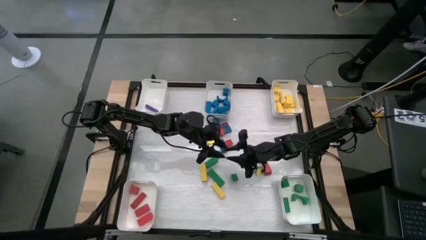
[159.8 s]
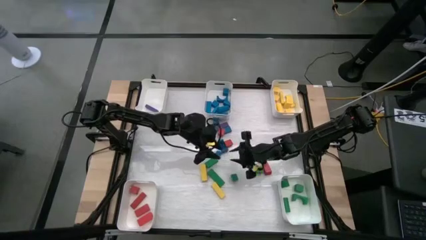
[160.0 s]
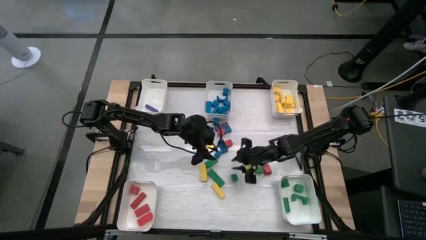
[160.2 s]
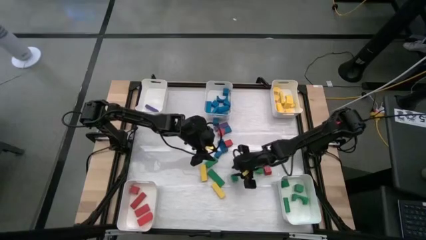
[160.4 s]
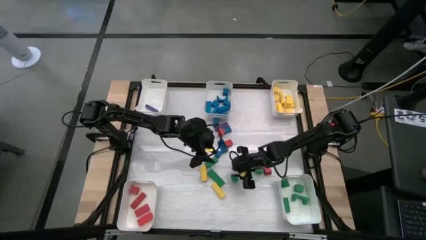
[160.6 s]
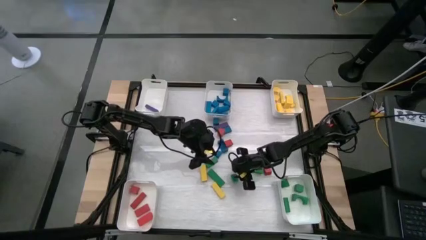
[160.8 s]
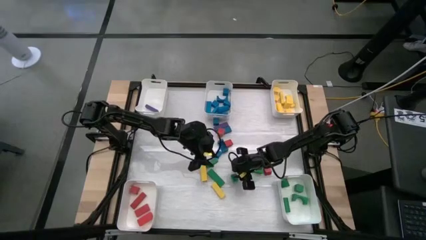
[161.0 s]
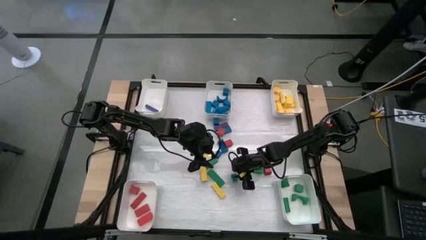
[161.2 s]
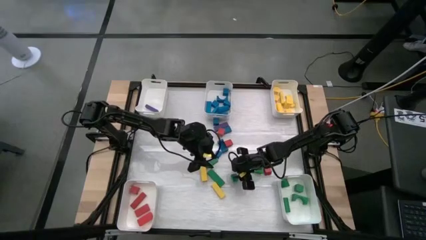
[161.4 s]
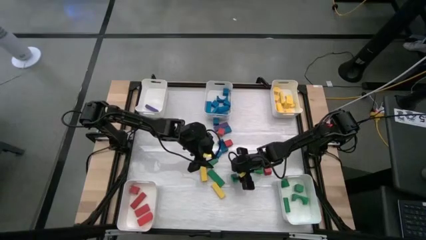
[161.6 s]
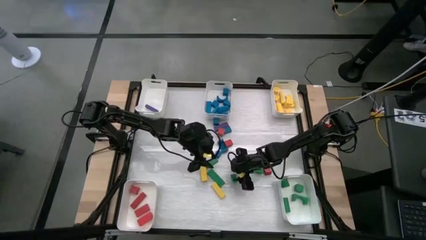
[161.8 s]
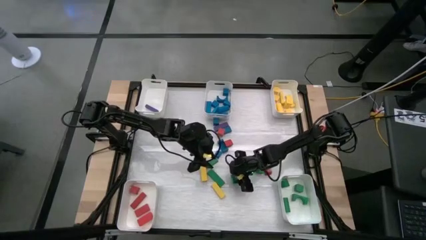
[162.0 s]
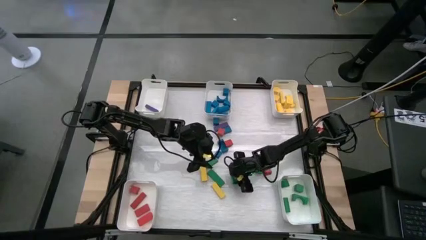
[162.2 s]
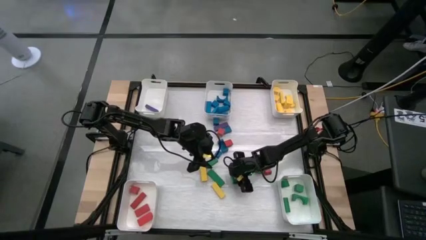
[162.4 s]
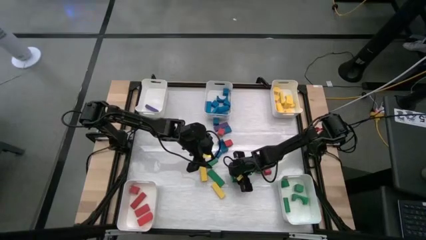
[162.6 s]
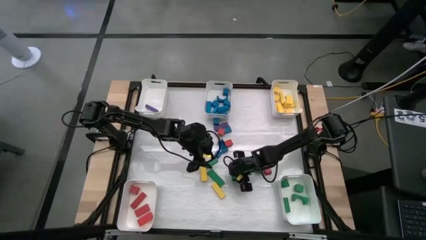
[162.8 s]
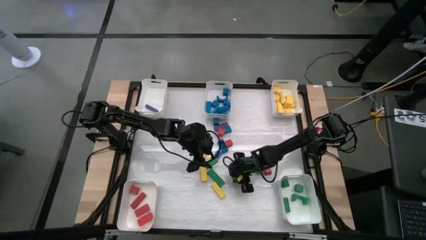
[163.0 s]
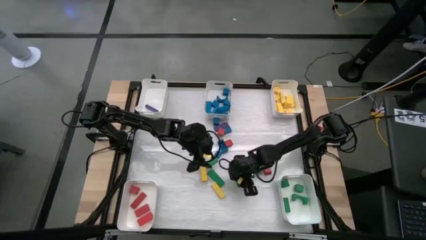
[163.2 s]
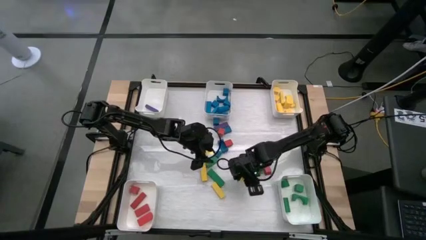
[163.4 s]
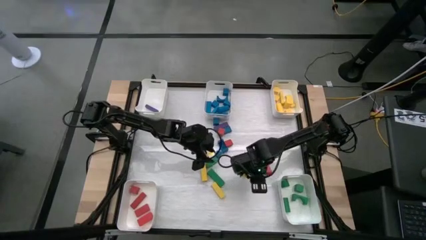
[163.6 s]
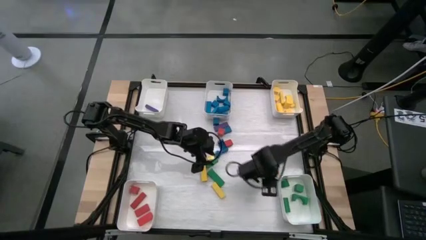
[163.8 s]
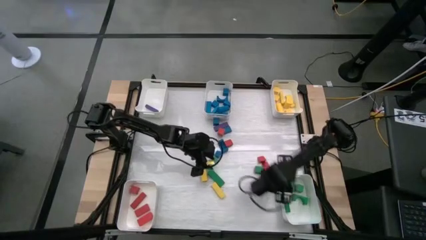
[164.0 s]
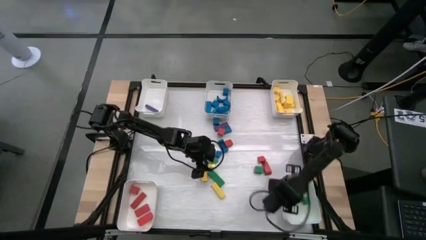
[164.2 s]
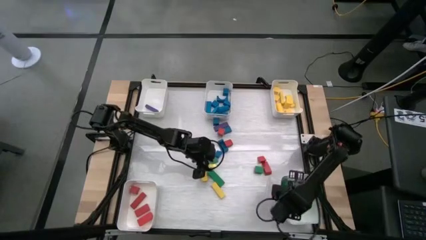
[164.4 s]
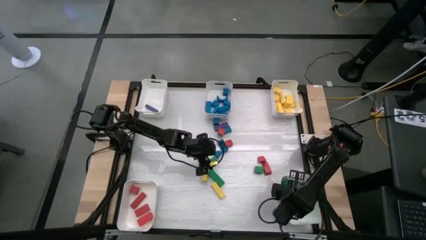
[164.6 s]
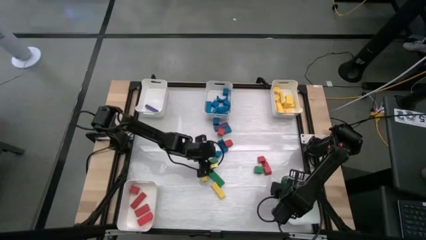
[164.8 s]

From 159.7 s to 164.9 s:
Task: Sort blocks
Put the green block into the bottom right white bin

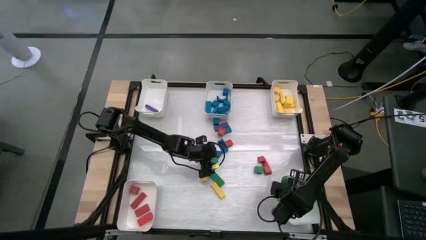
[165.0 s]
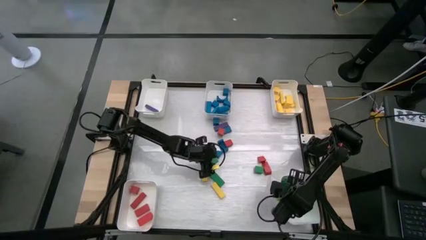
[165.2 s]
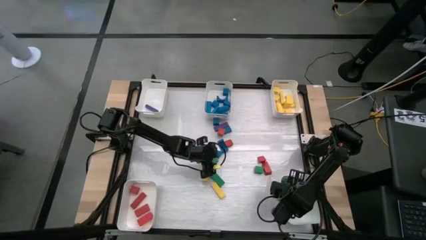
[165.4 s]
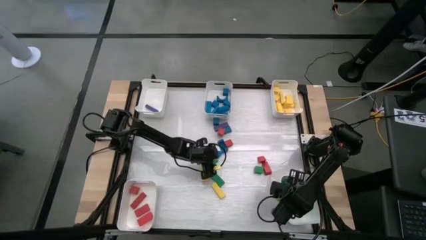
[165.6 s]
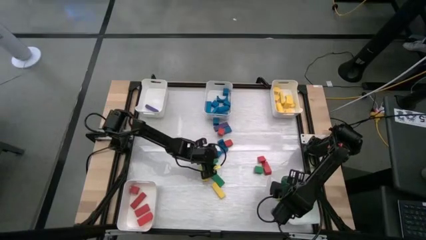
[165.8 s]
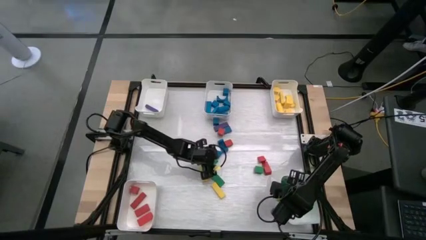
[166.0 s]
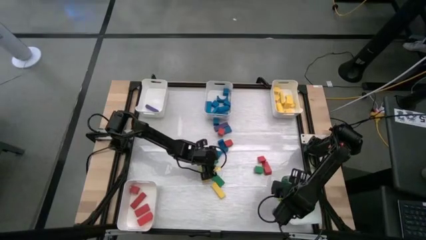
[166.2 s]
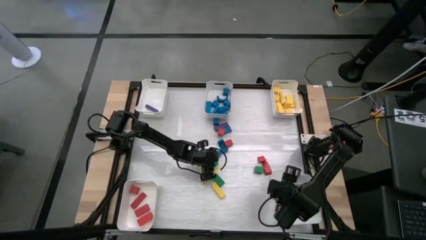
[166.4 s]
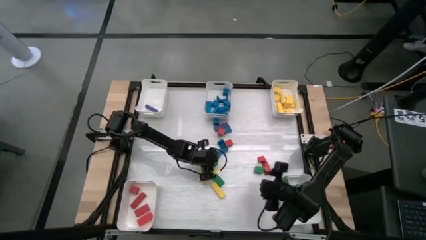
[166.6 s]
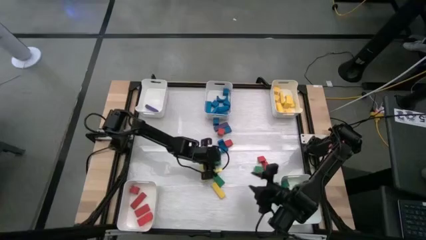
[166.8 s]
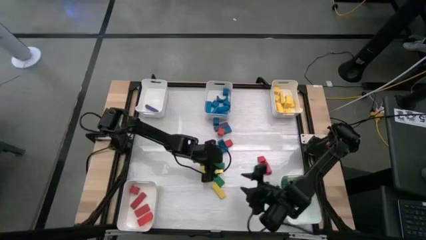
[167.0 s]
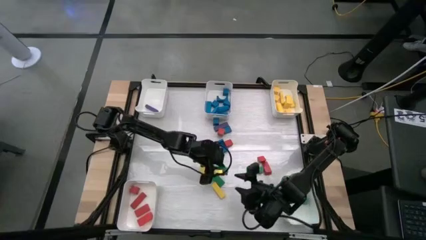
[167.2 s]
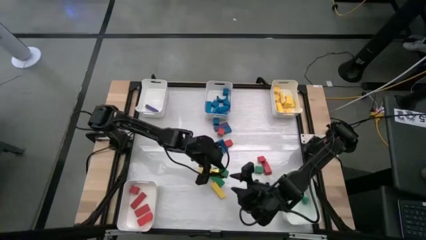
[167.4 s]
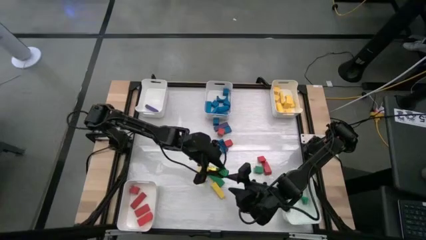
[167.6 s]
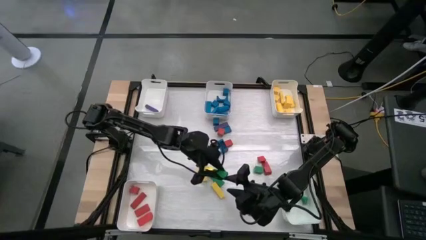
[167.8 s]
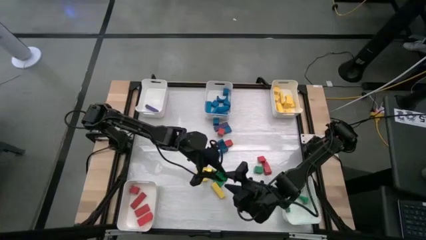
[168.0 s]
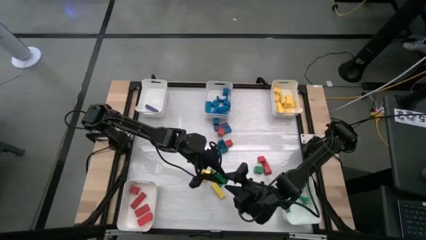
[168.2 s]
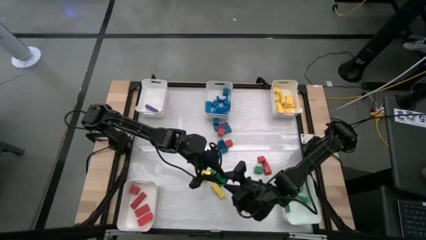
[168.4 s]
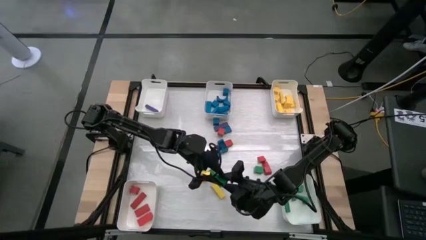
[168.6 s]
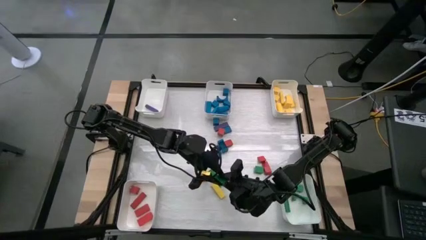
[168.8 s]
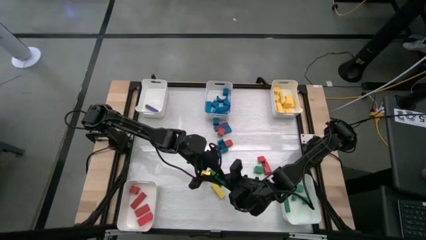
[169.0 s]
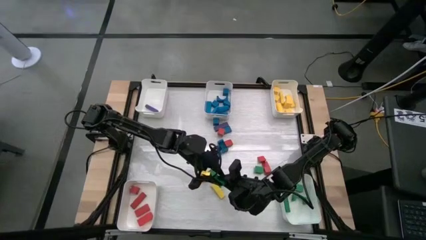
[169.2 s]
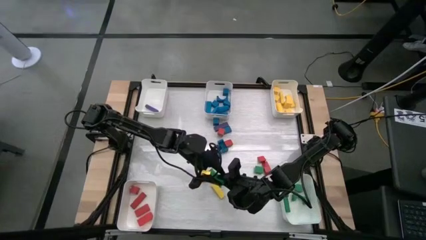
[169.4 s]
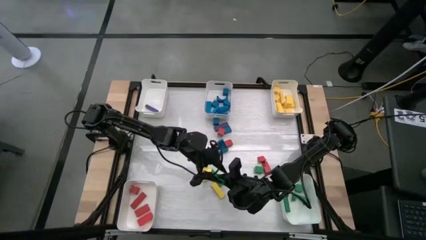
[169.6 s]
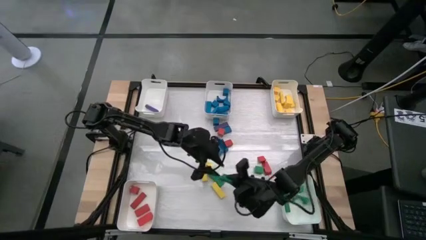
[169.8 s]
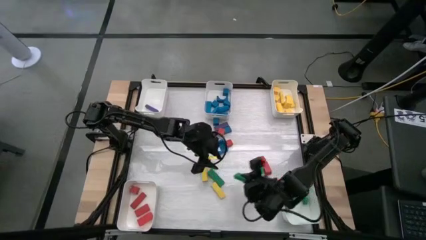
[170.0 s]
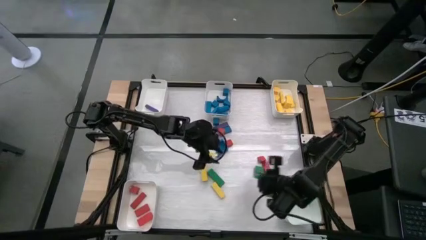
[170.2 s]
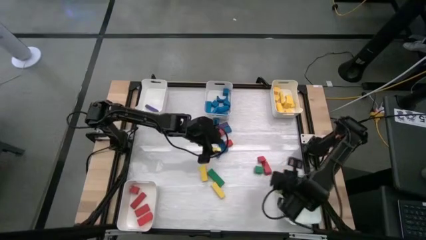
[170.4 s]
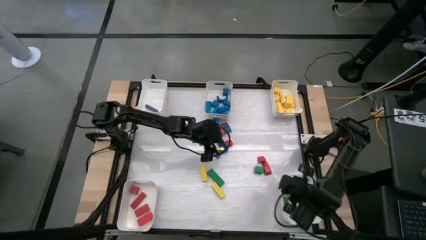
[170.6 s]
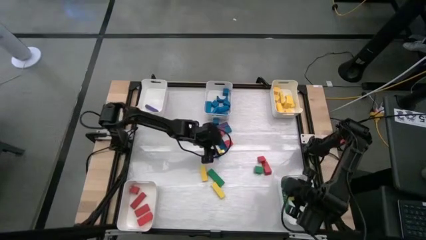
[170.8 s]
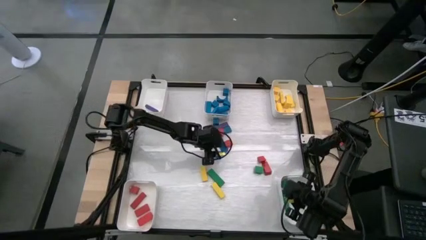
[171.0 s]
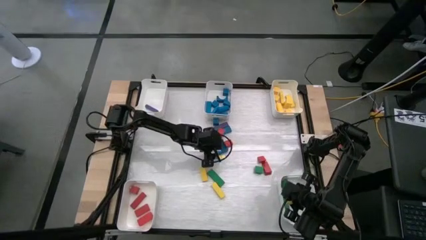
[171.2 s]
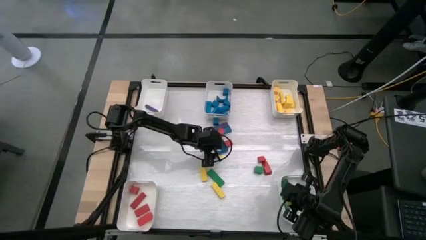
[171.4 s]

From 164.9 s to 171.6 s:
Put the green block into the bottom right white bin

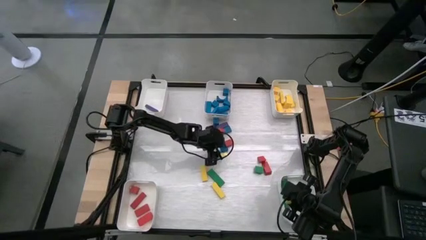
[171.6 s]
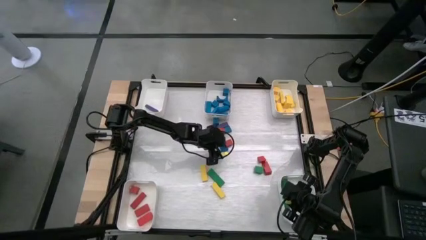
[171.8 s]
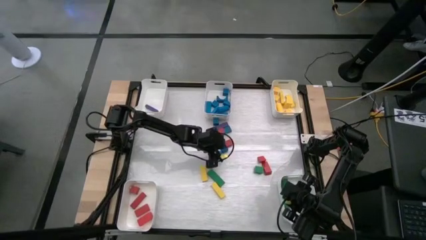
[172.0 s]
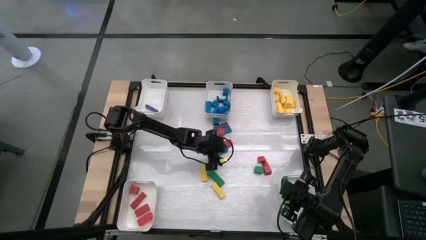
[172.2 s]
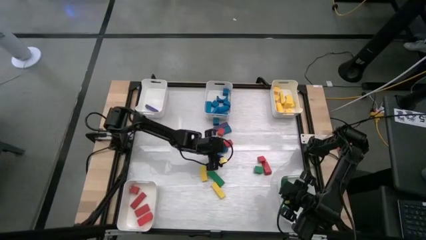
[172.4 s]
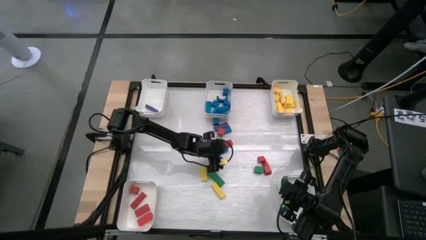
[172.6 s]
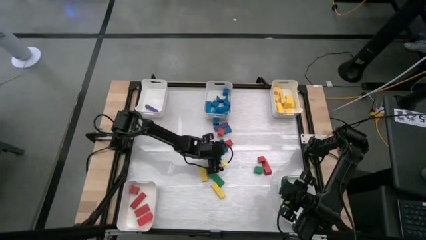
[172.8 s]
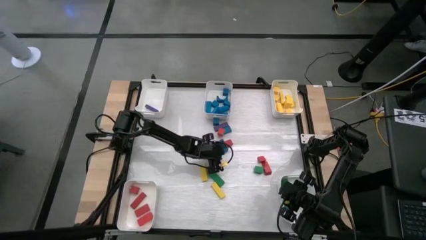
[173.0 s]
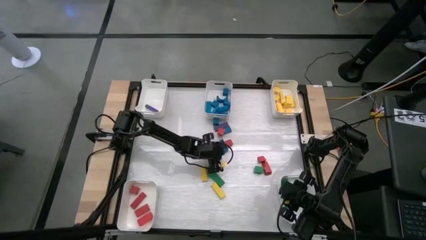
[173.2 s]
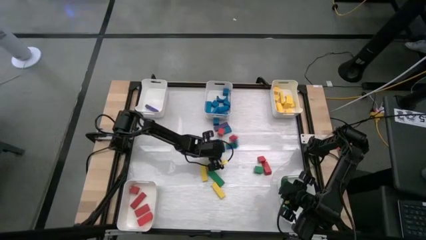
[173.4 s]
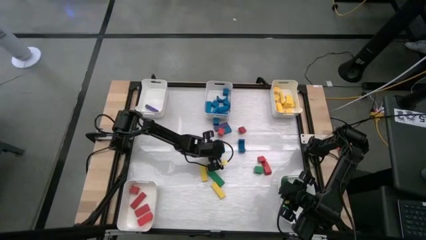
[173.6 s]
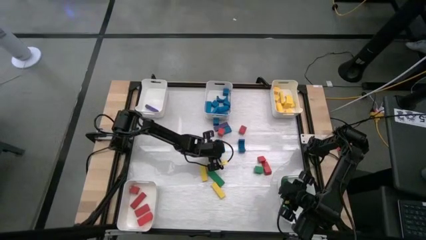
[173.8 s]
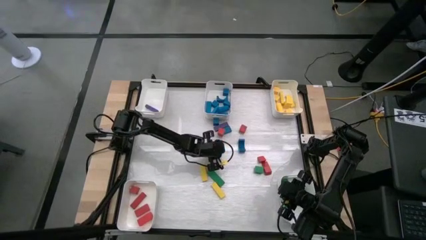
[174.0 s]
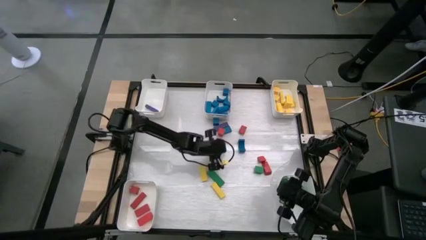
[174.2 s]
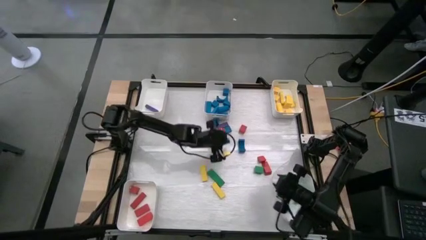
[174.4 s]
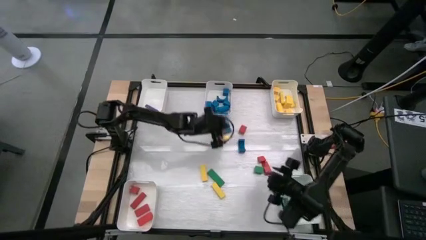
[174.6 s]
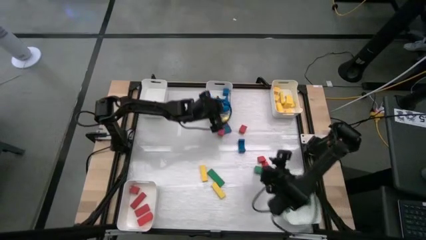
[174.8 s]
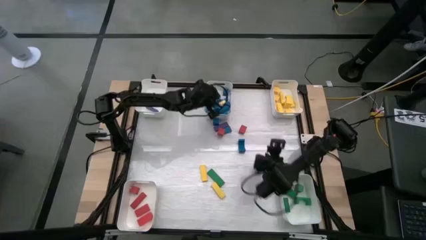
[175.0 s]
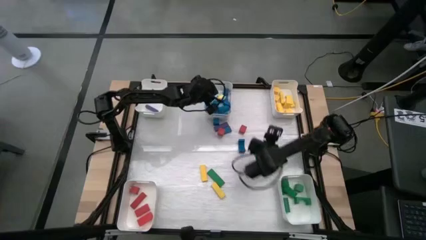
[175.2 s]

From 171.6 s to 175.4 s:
Put the blue block into the top center white bin

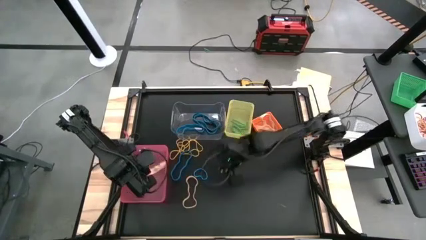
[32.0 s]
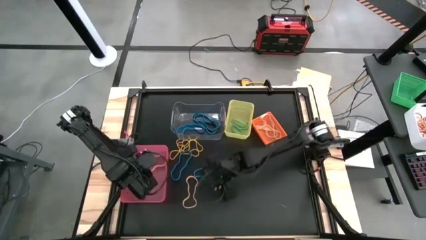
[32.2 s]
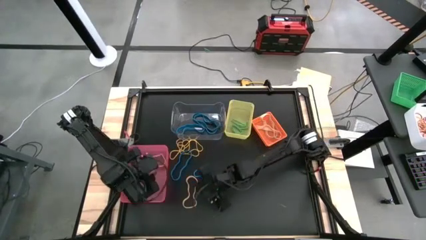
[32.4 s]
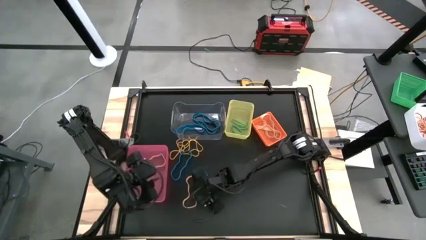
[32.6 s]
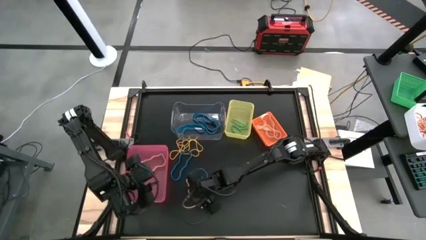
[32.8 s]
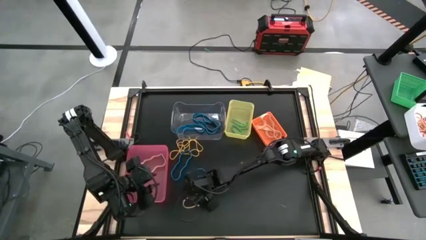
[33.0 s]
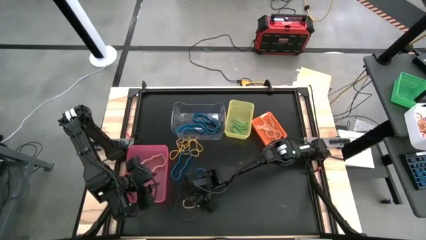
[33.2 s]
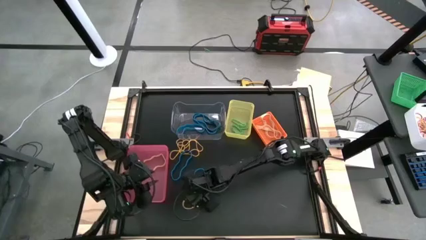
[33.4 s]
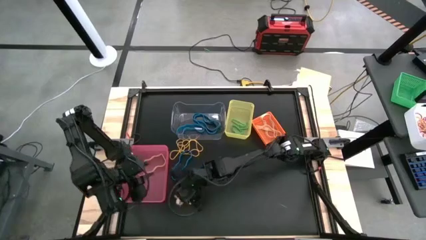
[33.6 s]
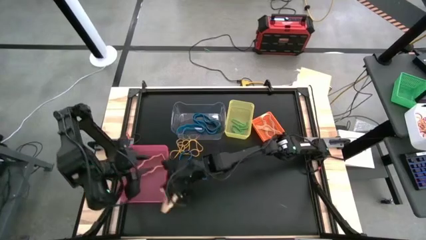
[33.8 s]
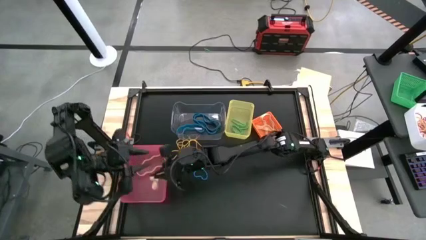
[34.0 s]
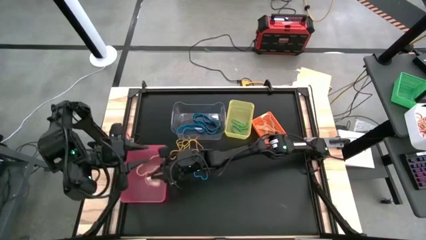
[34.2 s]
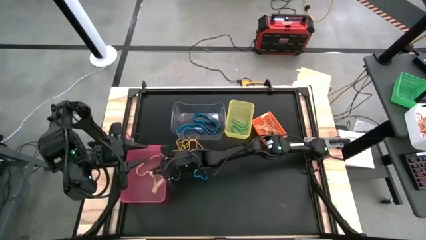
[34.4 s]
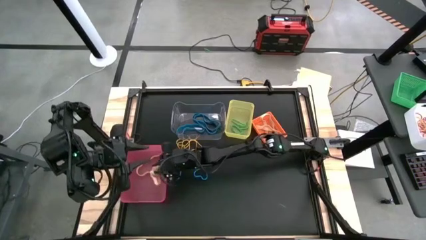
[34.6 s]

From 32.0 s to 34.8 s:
Task: Sort rubber bands into baskets
Put the orange rubber band into the pink bin
